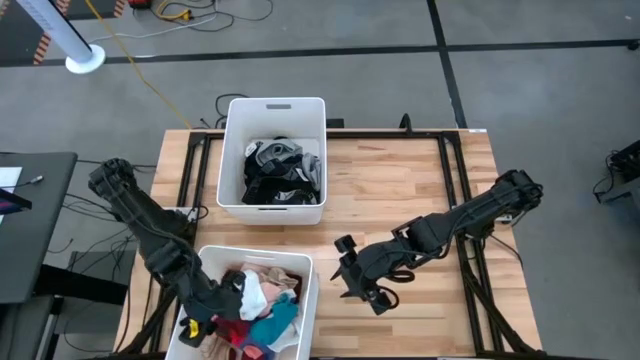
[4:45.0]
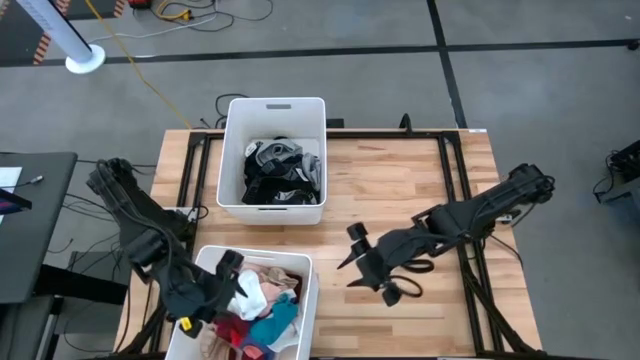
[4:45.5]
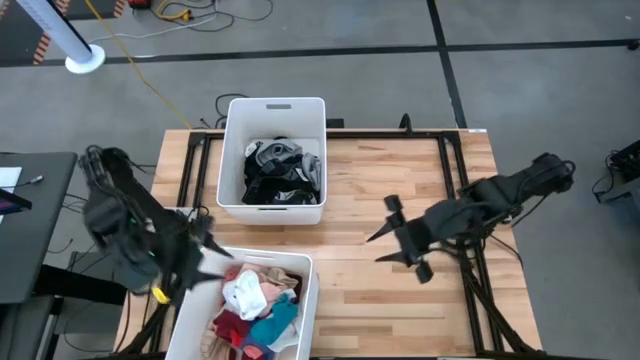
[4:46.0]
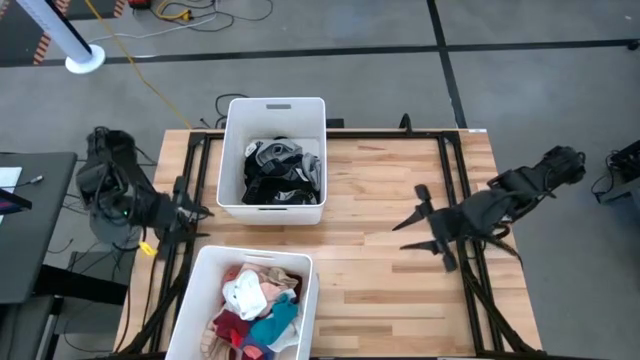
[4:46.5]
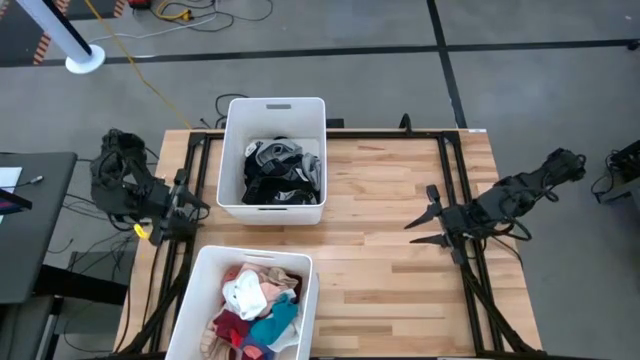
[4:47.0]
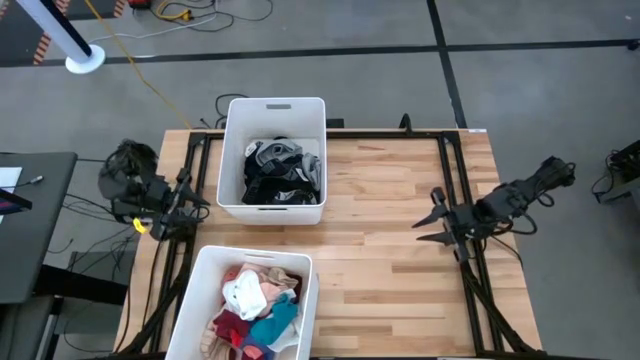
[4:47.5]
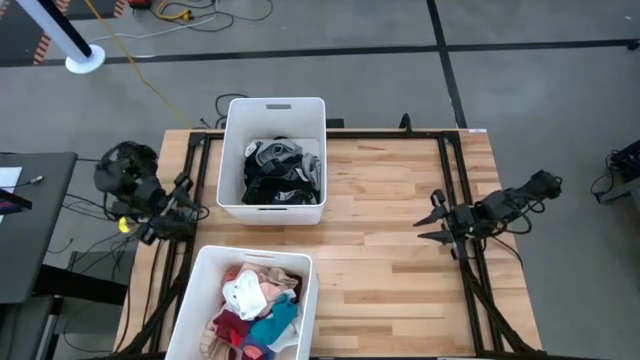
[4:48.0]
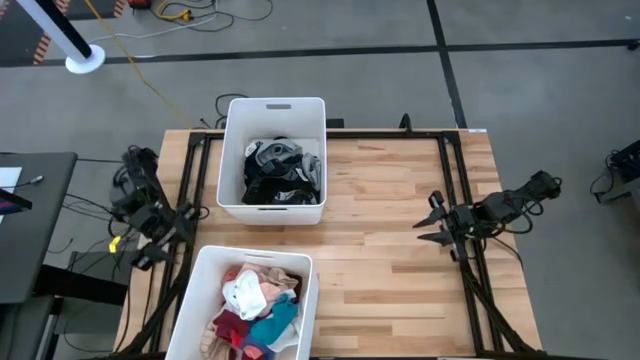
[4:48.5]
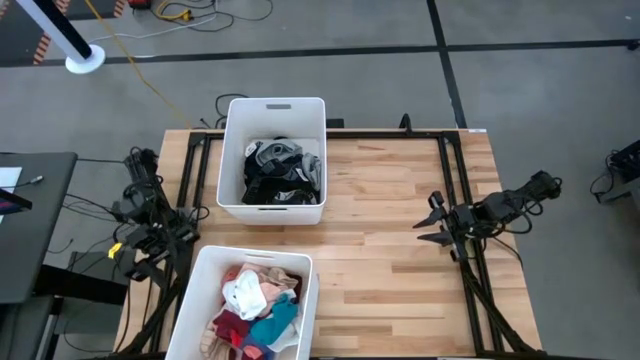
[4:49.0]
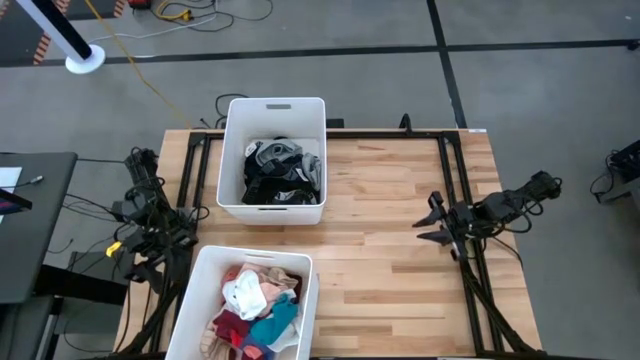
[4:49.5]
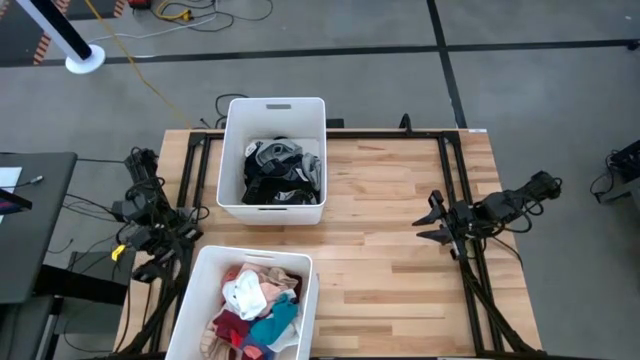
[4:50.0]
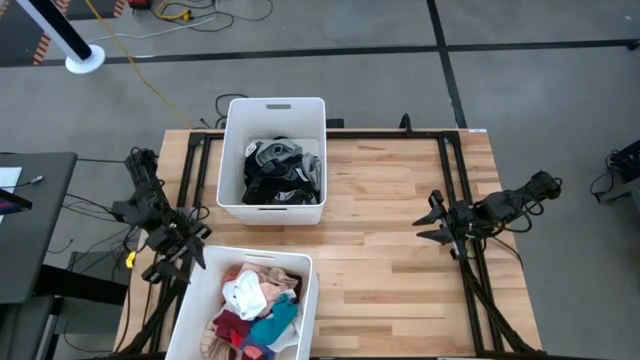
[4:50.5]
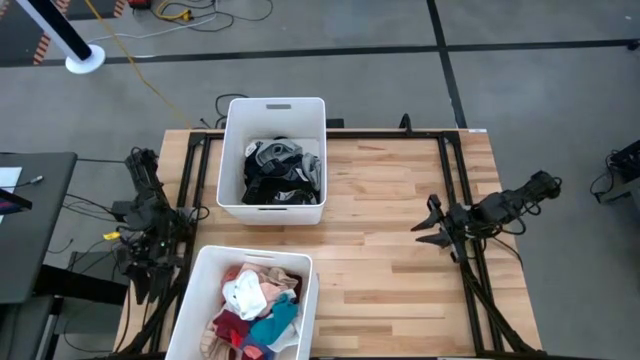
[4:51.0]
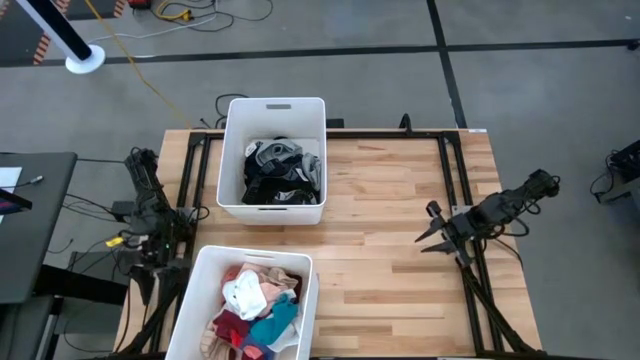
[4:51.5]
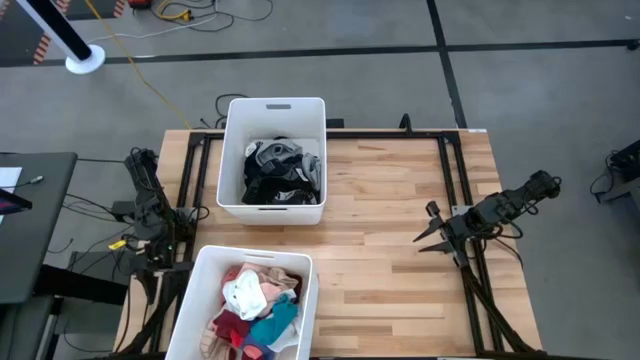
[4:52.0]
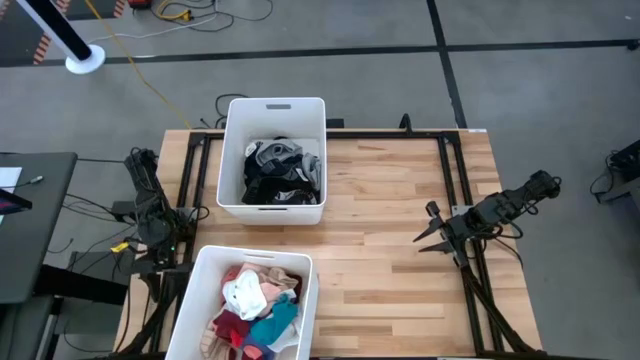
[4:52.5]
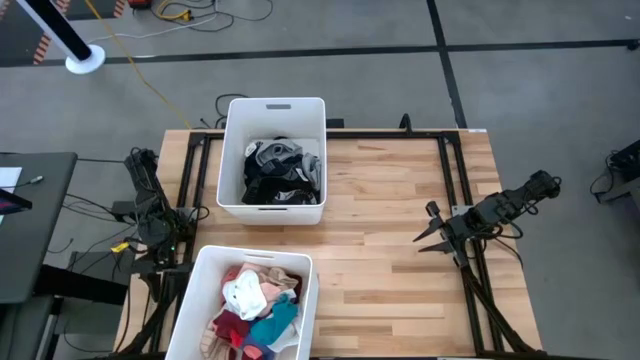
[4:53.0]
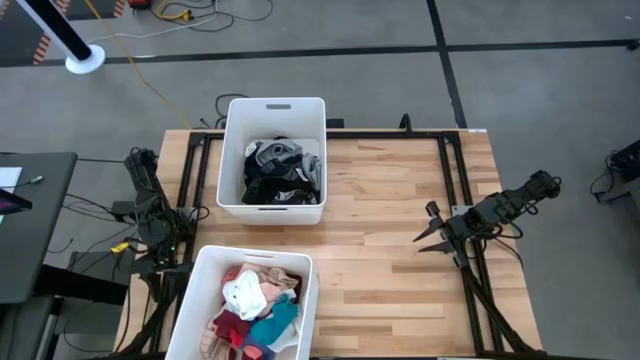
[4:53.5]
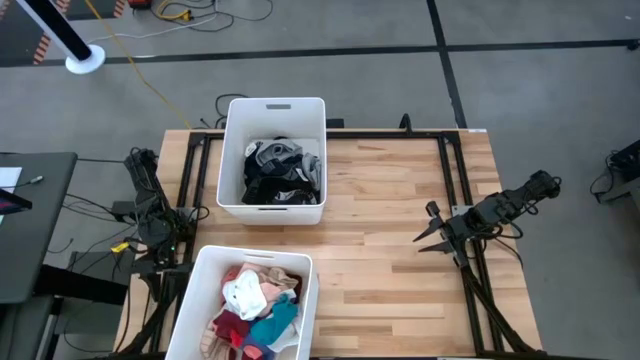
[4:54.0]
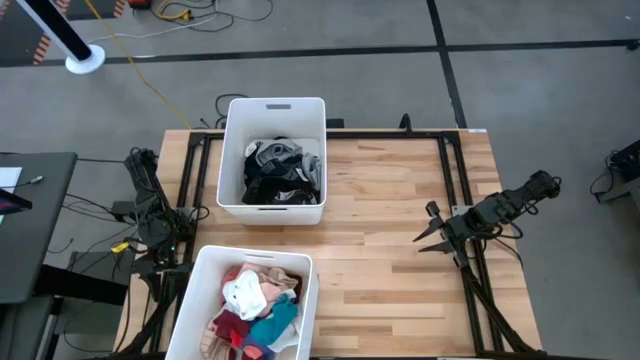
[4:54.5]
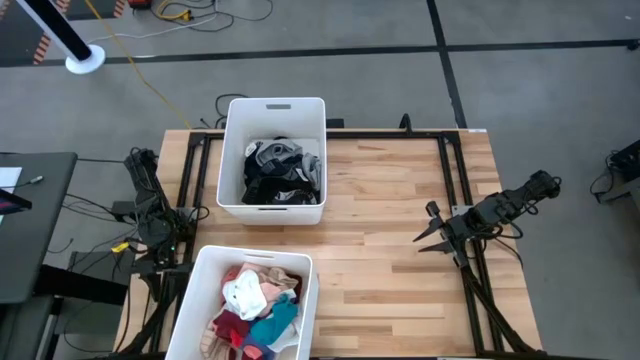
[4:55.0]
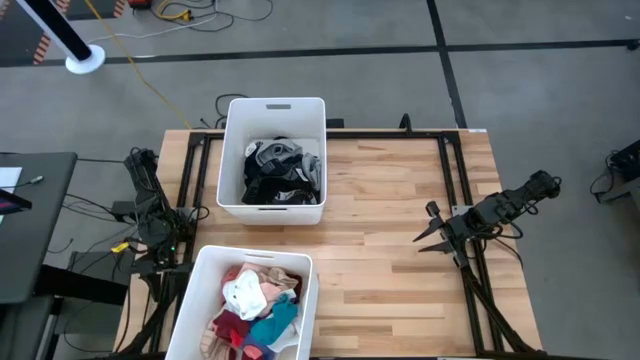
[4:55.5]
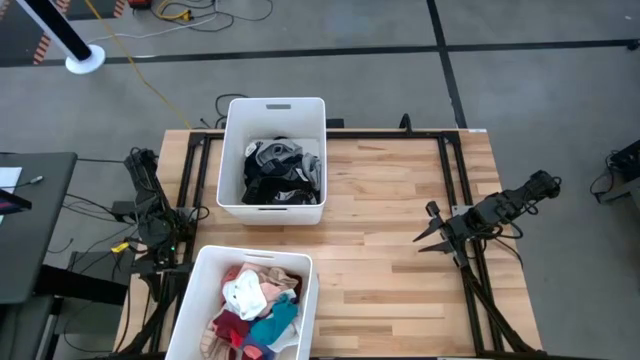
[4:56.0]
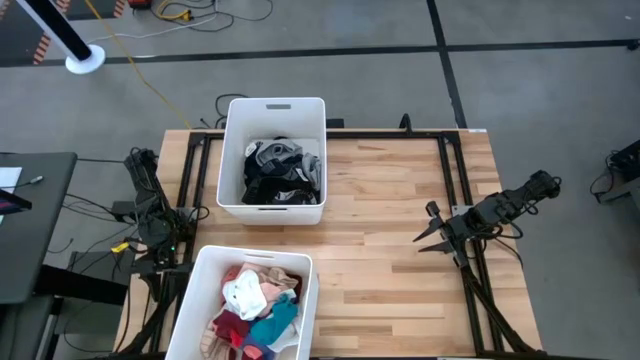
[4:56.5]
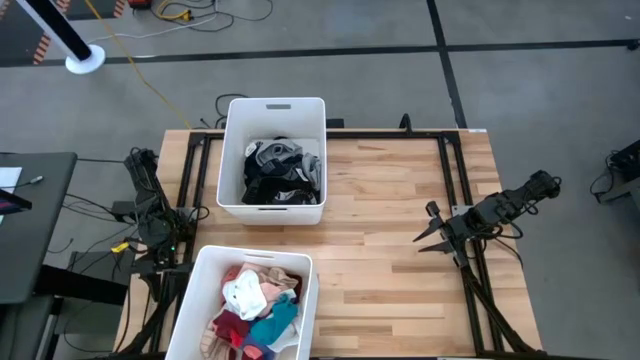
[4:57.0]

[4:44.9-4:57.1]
Task: Sort clothes
Return to Home Position
